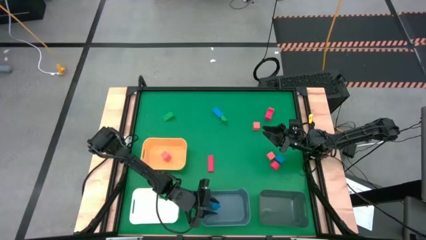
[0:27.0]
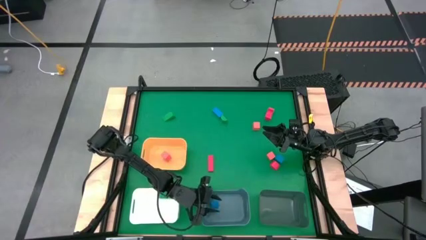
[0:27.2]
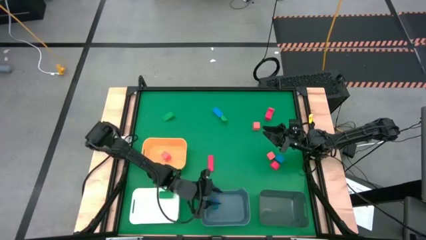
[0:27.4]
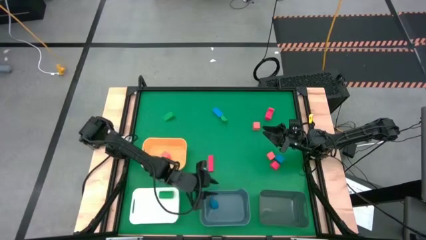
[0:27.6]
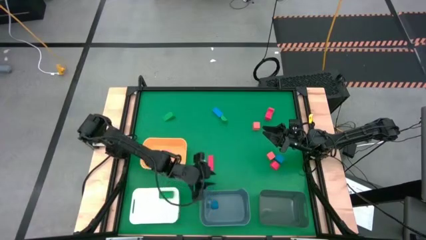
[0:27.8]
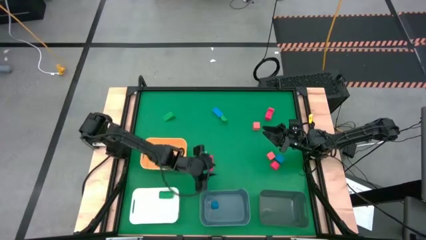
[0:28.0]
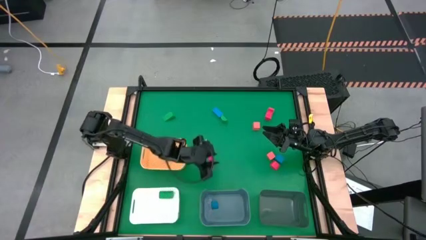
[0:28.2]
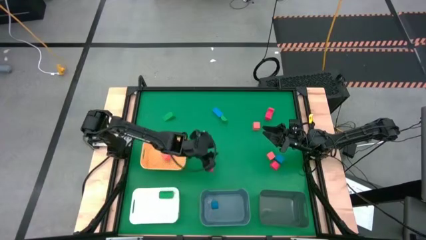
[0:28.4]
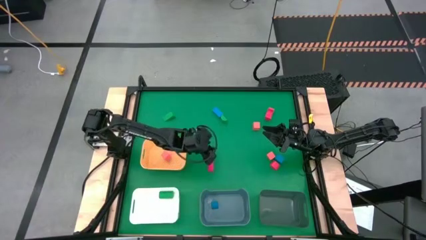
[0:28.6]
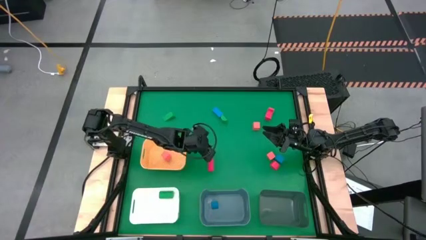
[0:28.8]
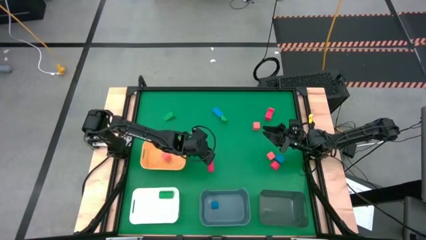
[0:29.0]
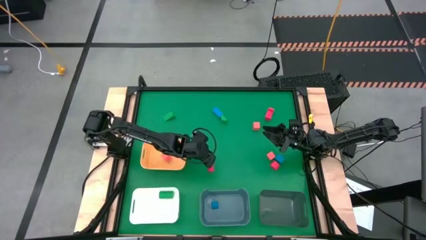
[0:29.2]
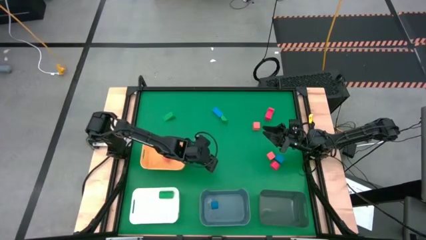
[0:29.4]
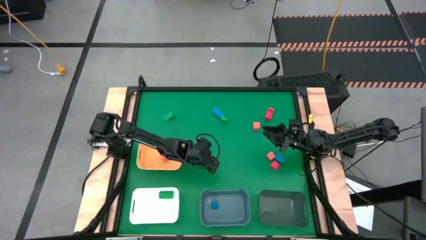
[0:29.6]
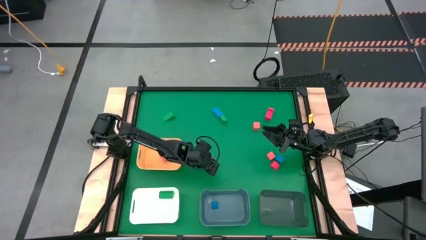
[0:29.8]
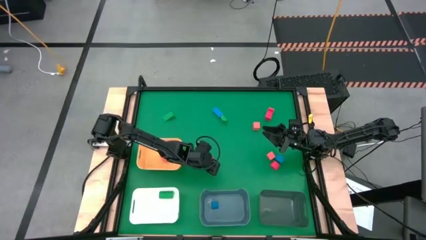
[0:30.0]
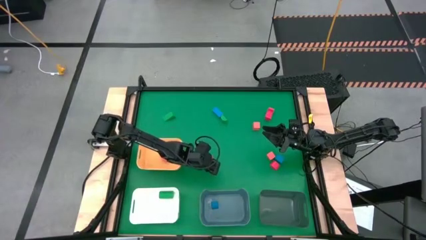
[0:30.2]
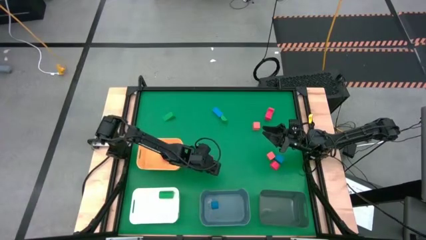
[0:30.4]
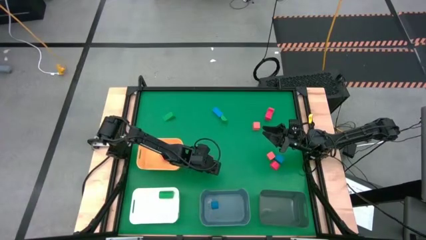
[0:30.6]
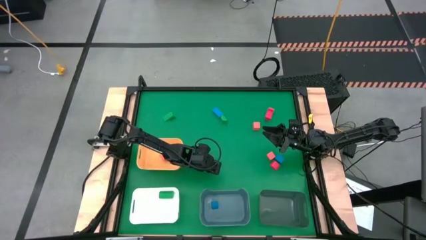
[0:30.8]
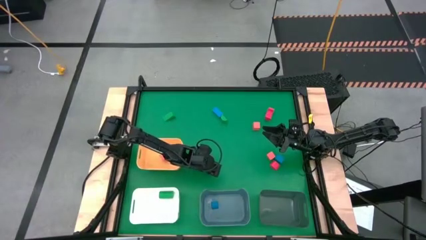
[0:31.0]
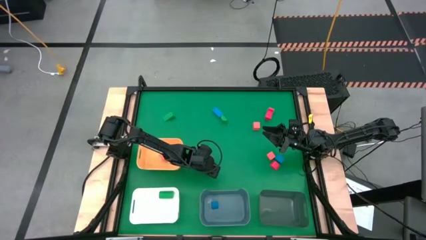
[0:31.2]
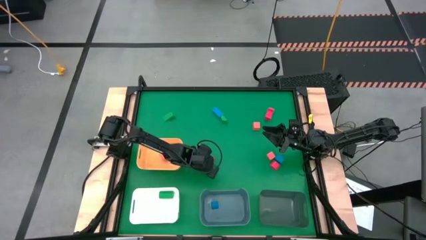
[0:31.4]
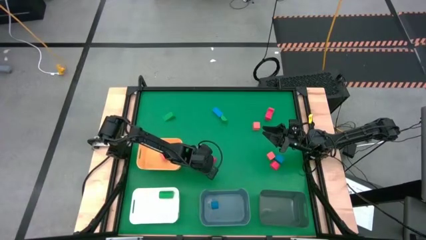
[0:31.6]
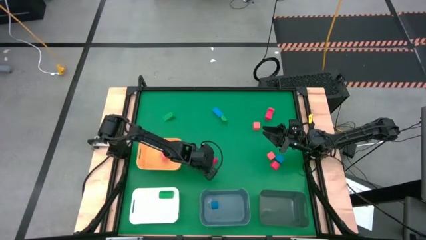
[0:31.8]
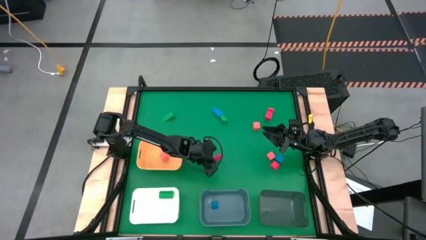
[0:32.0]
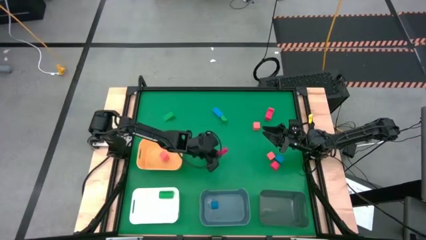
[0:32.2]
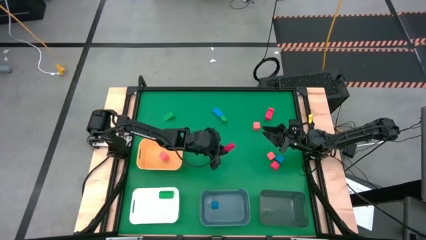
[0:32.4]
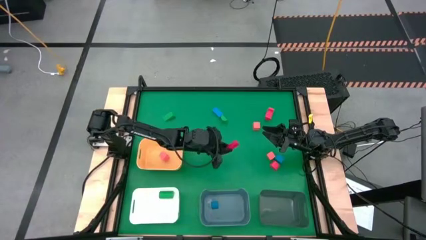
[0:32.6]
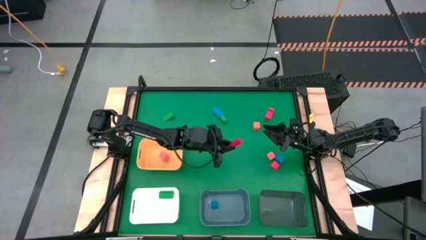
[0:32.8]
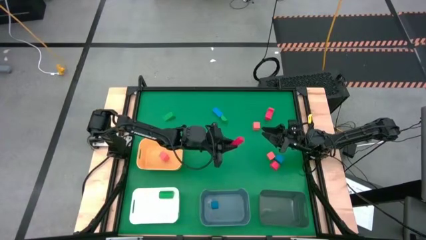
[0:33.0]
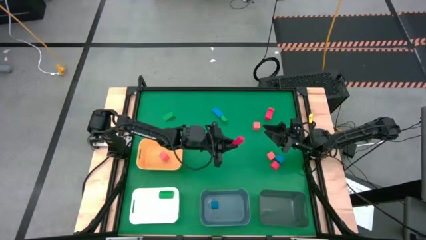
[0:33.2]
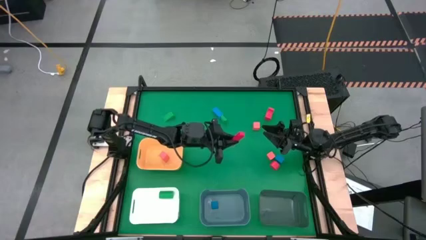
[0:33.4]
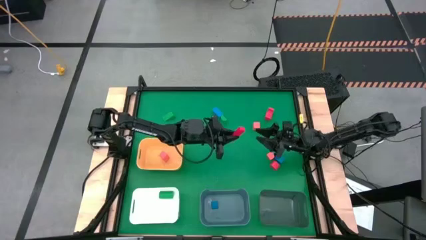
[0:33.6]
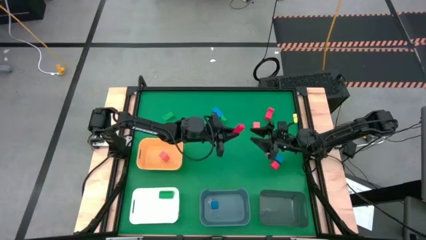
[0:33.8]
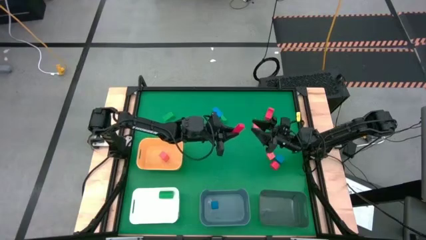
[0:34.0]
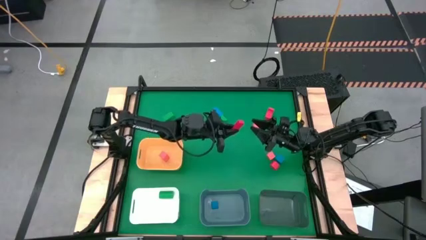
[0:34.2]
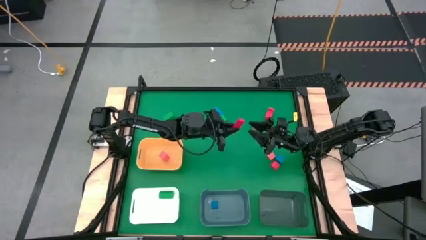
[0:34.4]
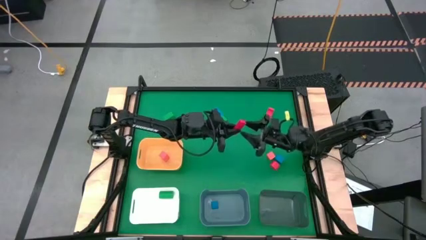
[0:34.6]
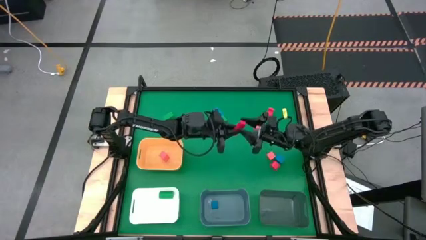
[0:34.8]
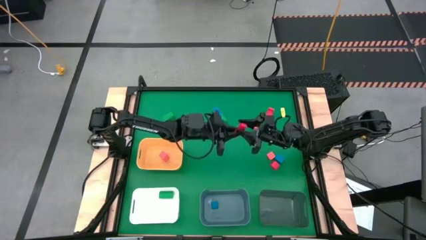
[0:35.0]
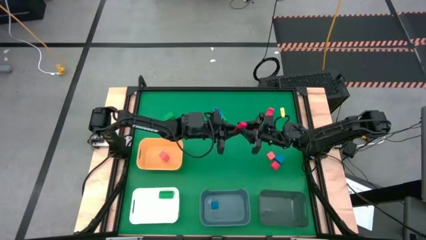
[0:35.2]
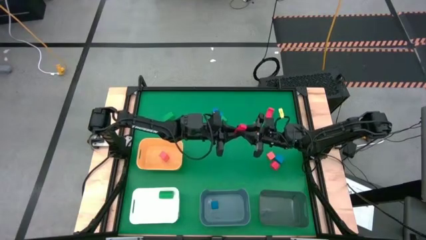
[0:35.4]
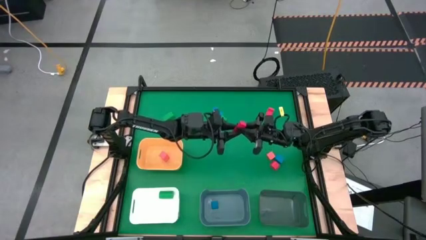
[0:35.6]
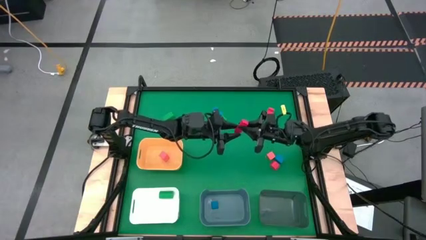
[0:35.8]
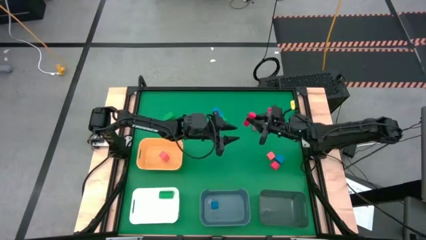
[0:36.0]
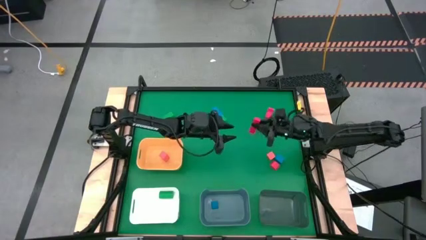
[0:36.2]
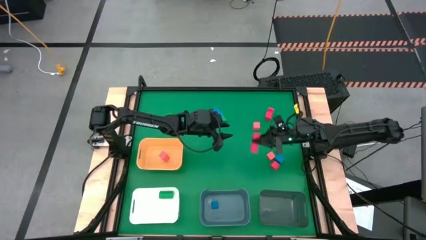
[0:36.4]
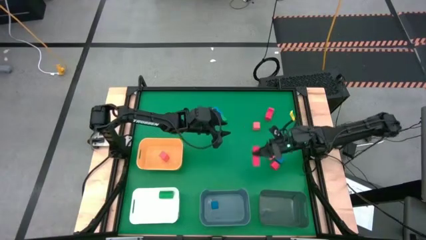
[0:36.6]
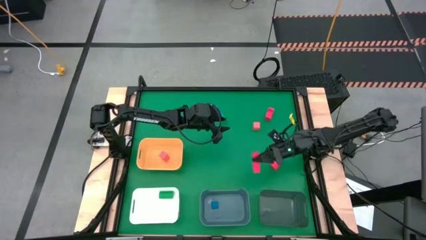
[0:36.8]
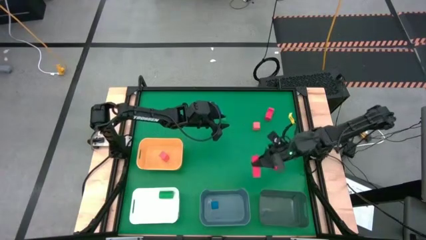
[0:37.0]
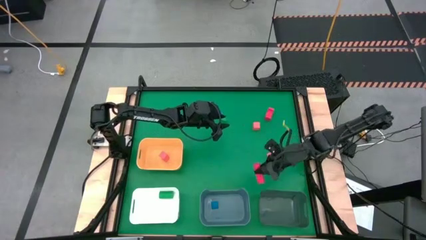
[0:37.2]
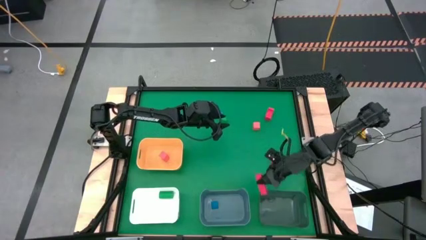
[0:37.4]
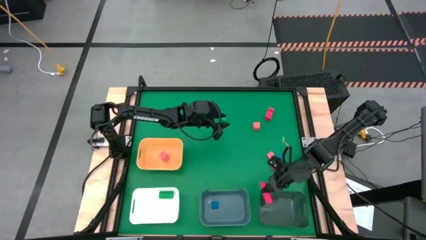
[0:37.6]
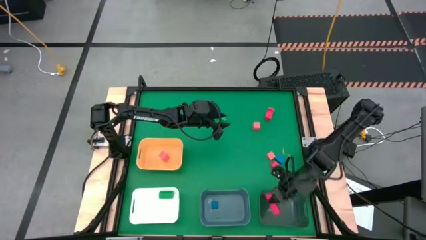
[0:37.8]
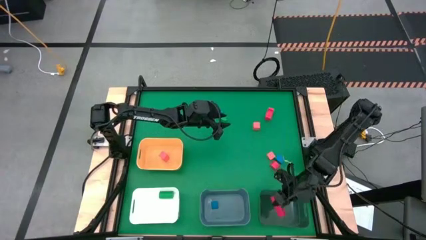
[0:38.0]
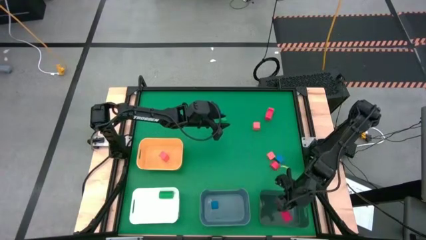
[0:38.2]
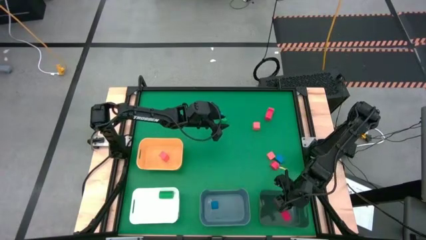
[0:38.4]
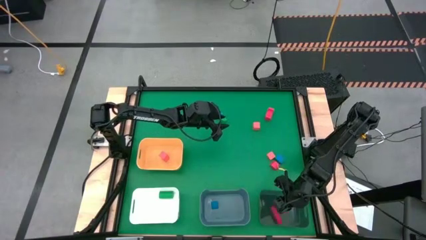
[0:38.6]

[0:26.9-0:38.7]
Task: Sort & place blocks by color
Put the bottom left red block into the gray bin

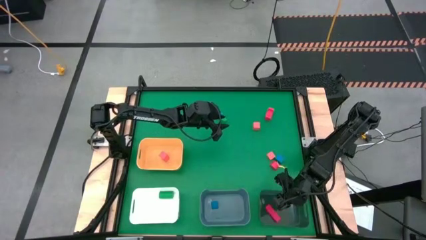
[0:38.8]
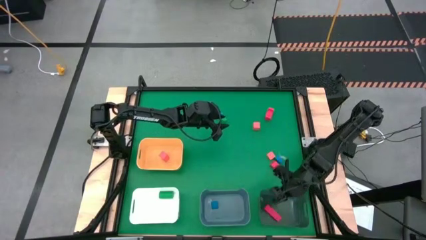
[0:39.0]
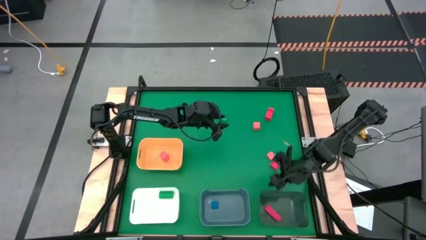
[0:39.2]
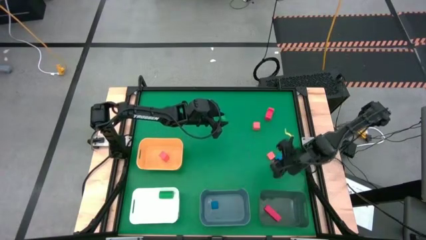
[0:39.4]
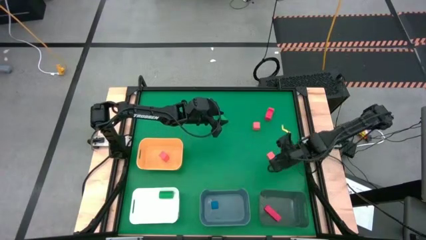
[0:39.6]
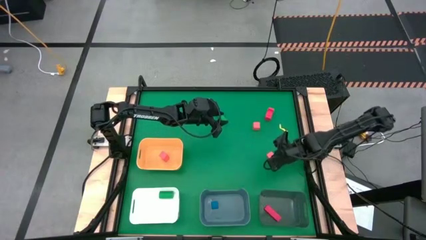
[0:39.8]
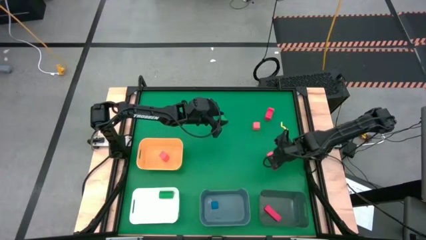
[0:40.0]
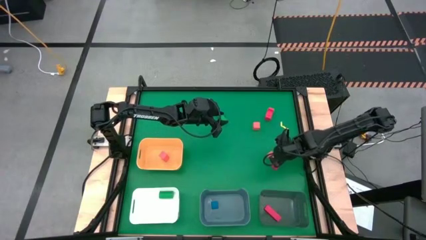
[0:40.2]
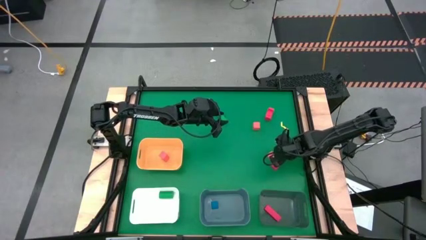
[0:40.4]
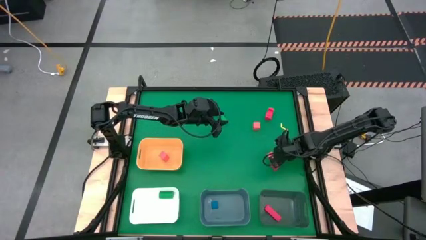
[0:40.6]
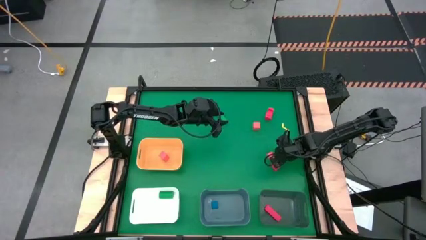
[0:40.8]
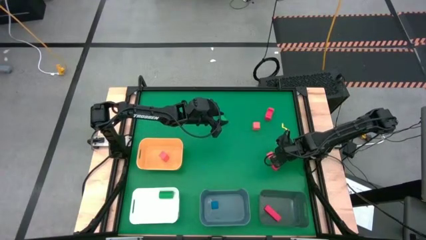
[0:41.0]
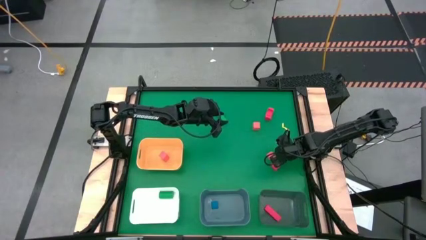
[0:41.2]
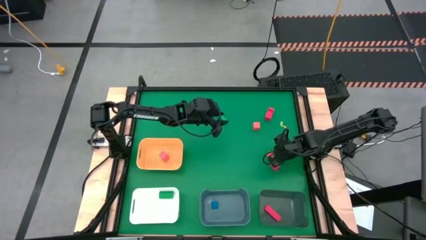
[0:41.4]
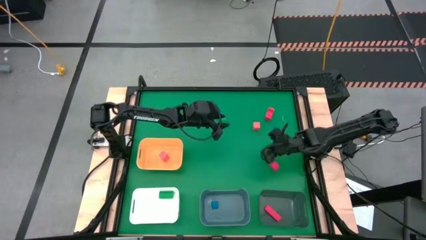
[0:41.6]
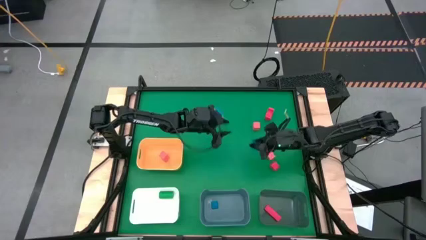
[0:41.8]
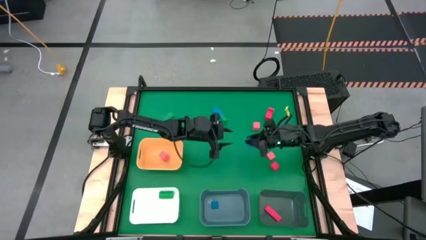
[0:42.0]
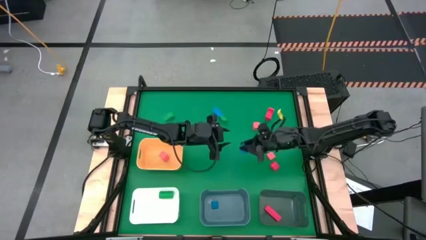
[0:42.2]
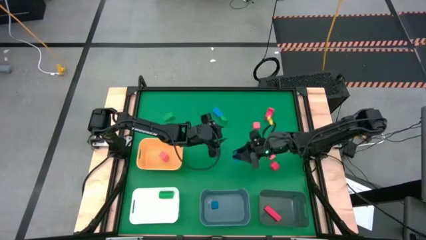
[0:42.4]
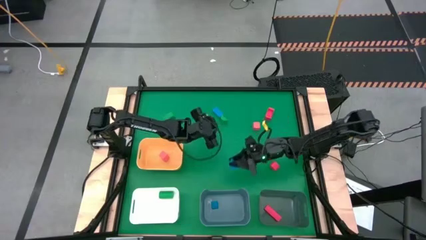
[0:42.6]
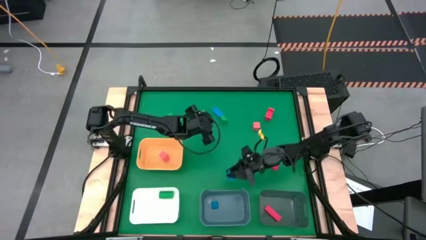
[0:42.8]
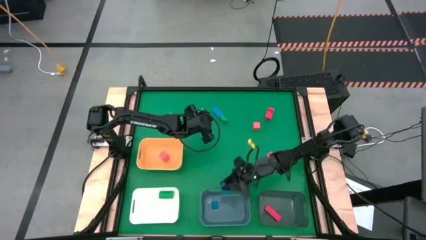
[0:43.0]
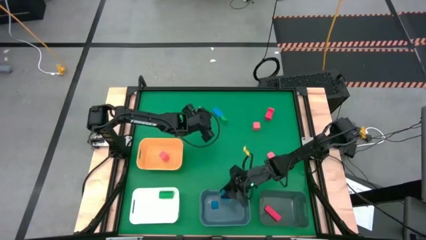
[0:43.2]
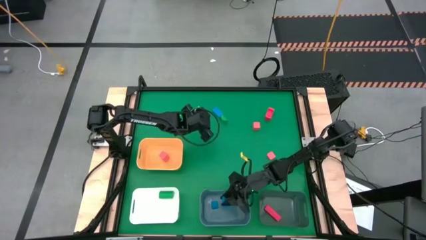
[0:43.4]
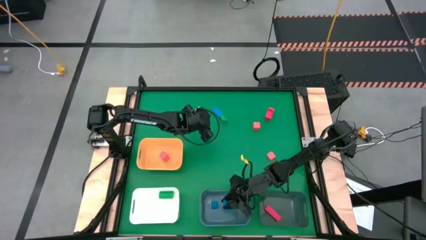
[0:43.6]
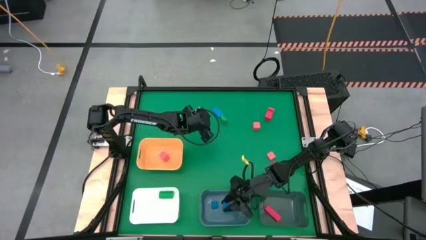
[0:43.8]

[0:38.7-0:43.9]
Put the bottom blue block into the blue bin
